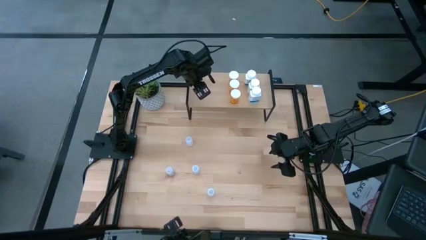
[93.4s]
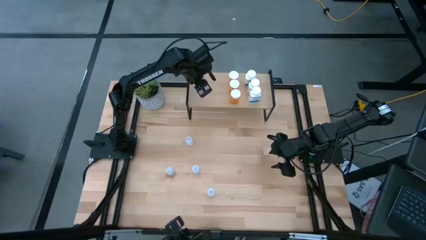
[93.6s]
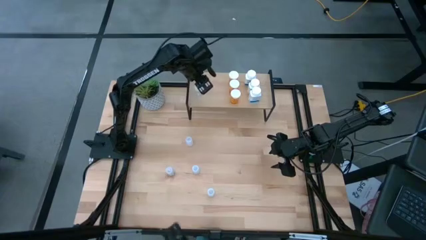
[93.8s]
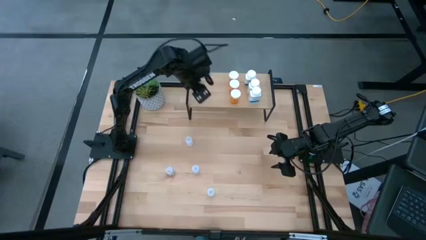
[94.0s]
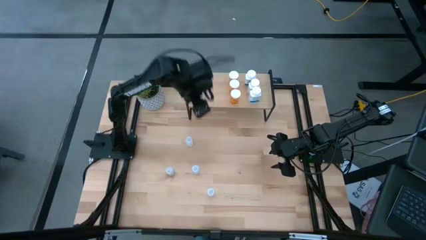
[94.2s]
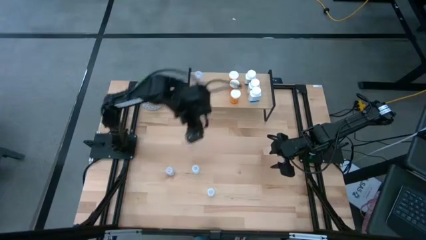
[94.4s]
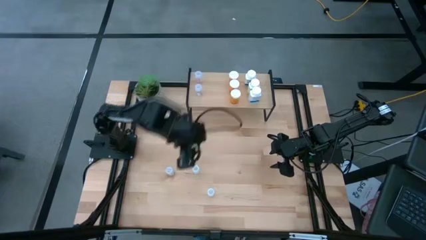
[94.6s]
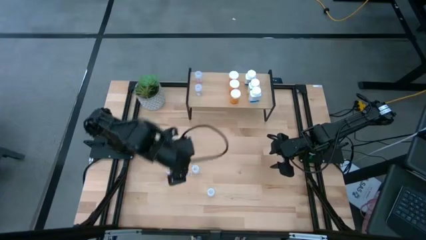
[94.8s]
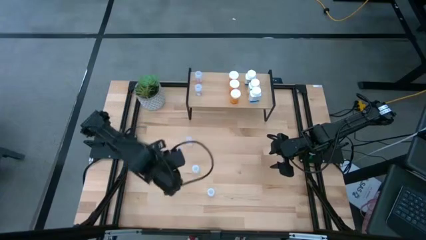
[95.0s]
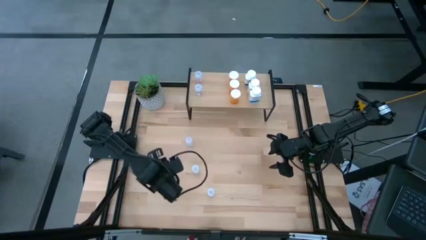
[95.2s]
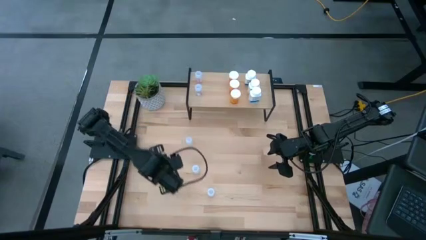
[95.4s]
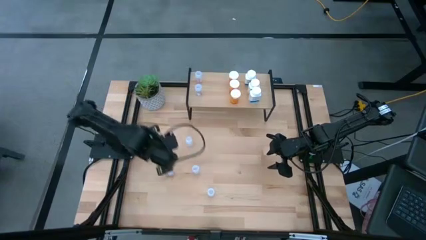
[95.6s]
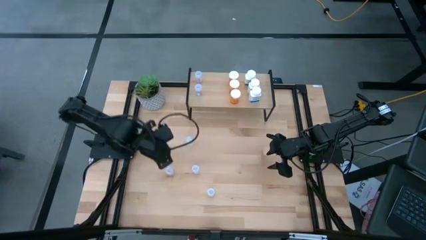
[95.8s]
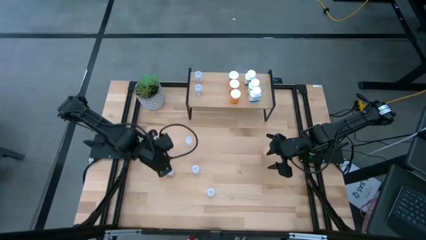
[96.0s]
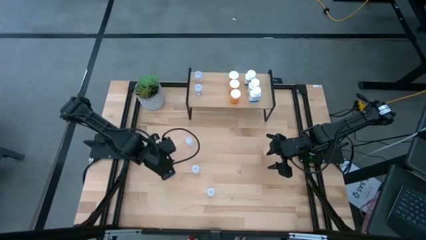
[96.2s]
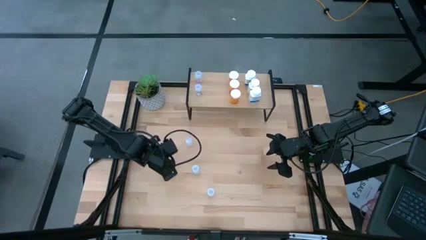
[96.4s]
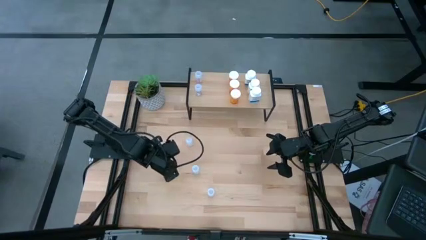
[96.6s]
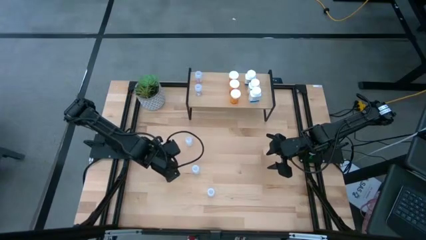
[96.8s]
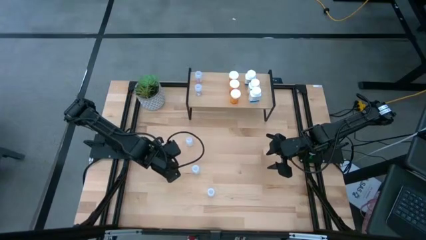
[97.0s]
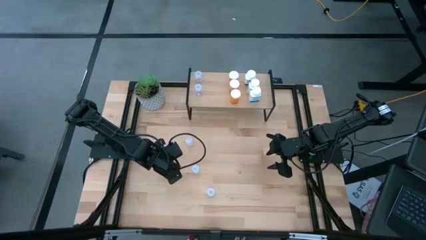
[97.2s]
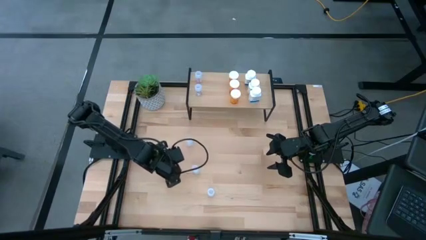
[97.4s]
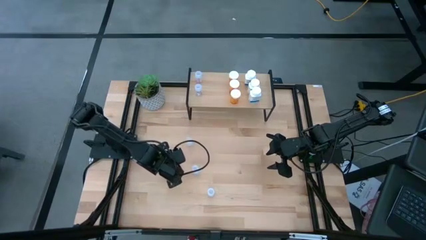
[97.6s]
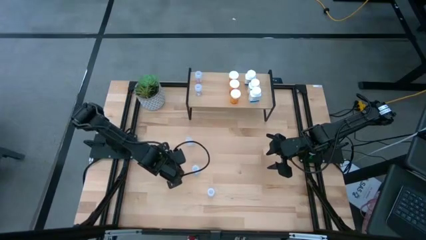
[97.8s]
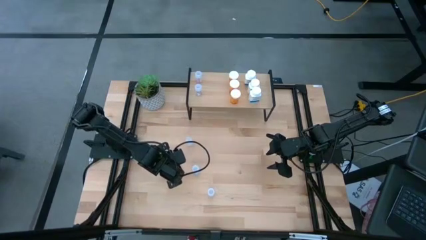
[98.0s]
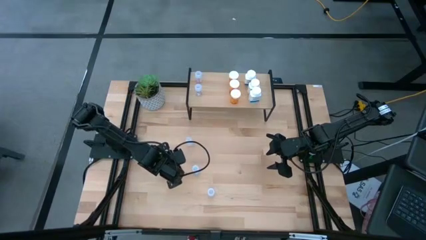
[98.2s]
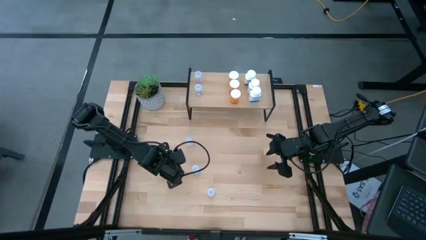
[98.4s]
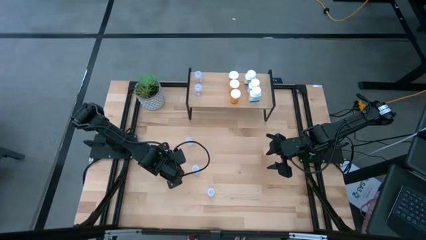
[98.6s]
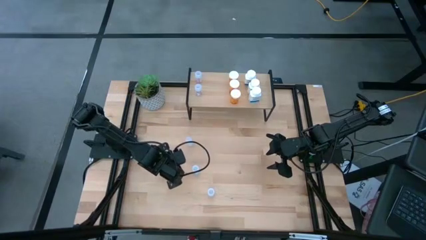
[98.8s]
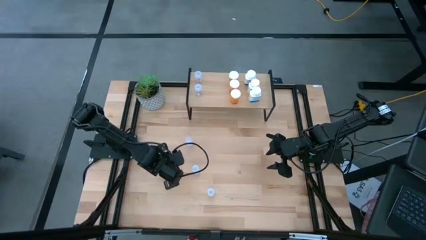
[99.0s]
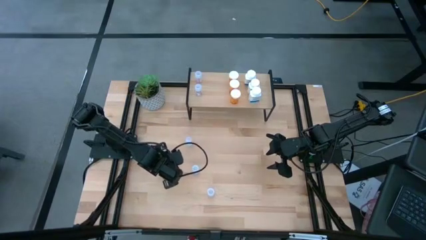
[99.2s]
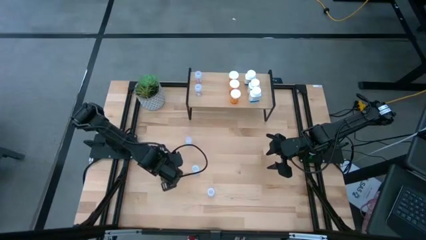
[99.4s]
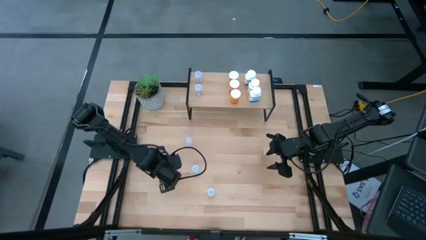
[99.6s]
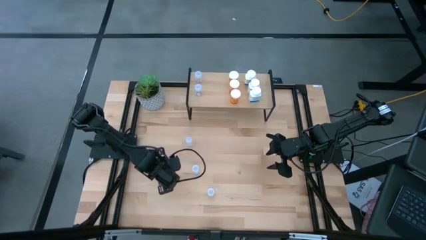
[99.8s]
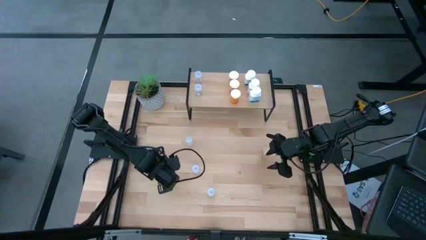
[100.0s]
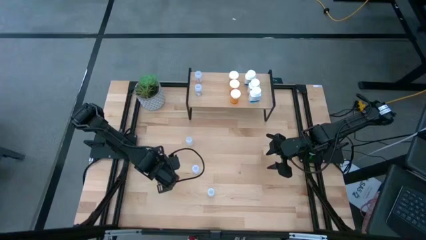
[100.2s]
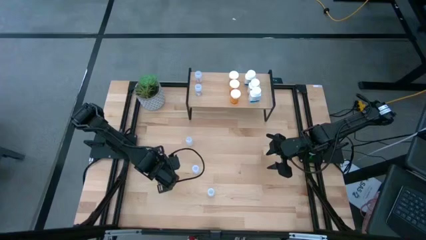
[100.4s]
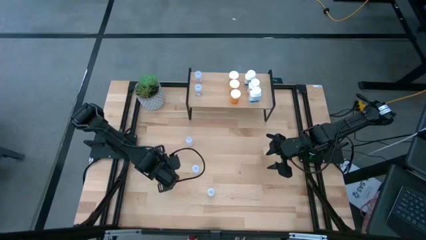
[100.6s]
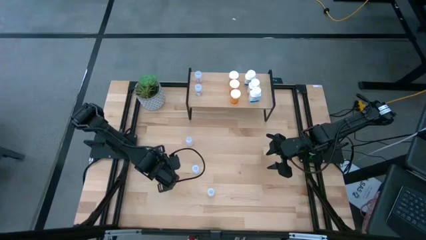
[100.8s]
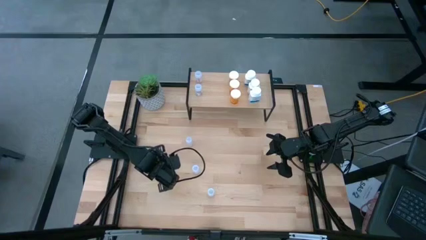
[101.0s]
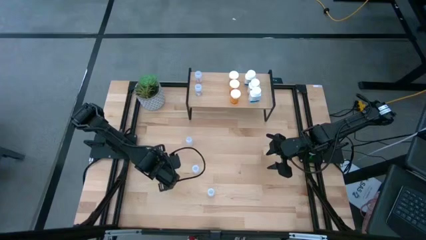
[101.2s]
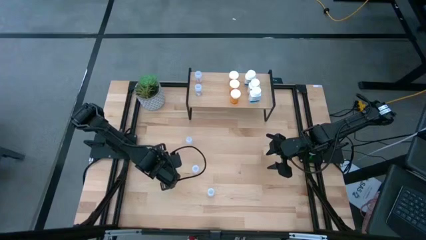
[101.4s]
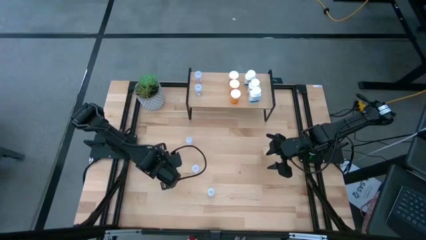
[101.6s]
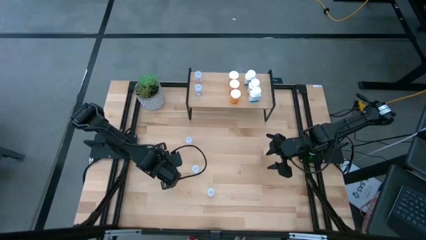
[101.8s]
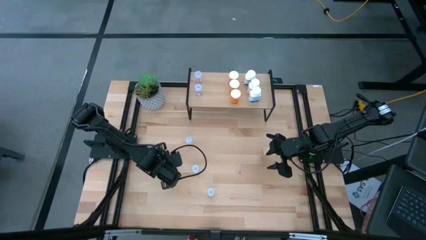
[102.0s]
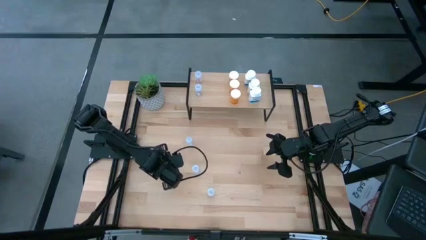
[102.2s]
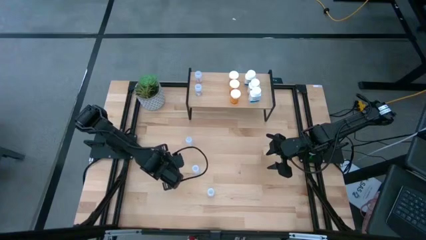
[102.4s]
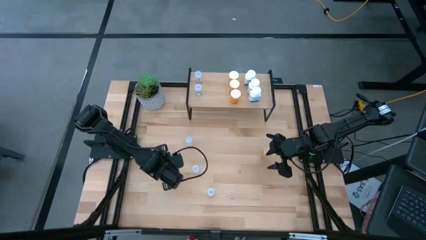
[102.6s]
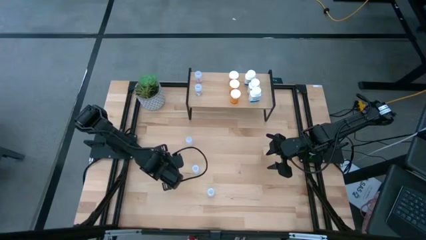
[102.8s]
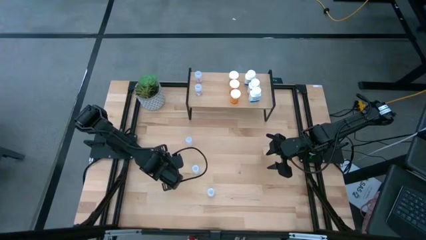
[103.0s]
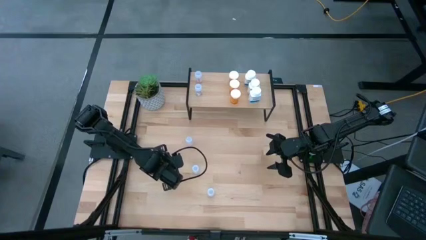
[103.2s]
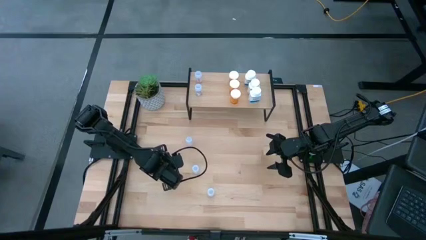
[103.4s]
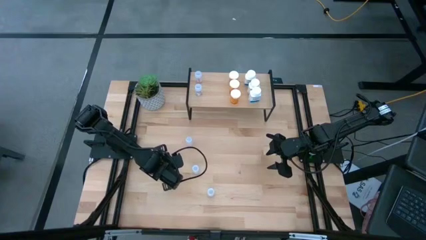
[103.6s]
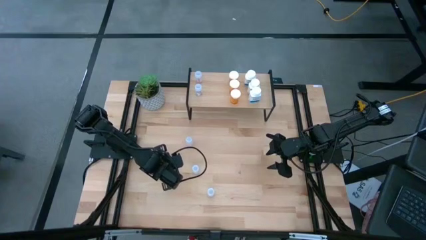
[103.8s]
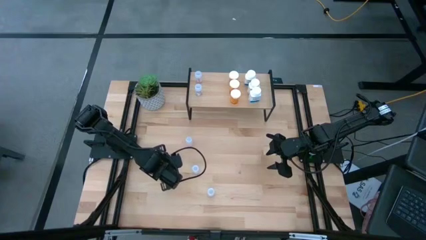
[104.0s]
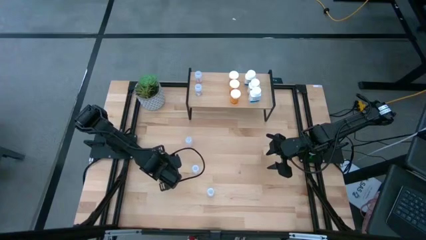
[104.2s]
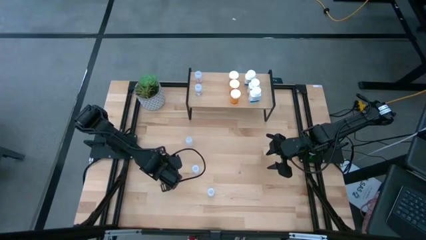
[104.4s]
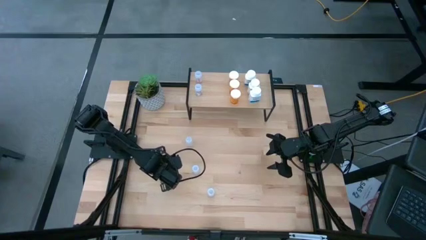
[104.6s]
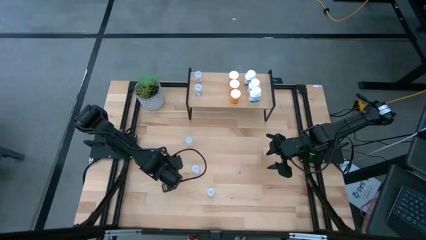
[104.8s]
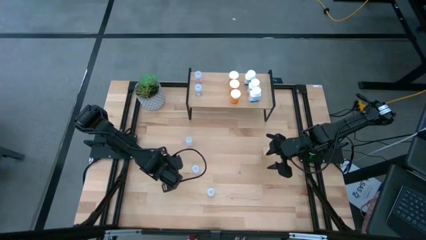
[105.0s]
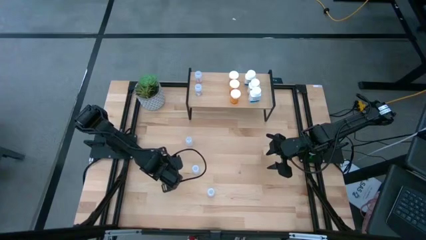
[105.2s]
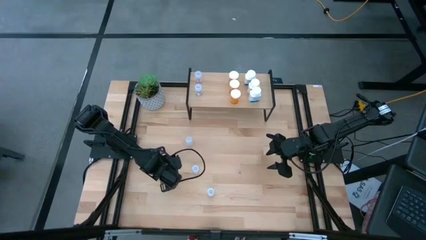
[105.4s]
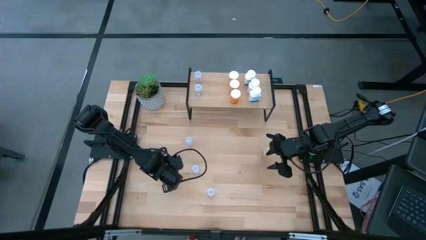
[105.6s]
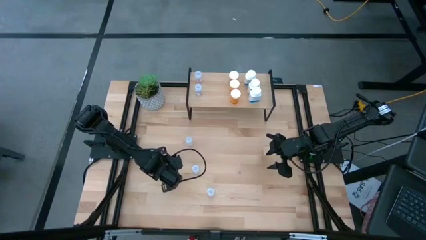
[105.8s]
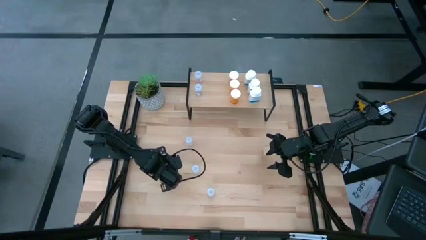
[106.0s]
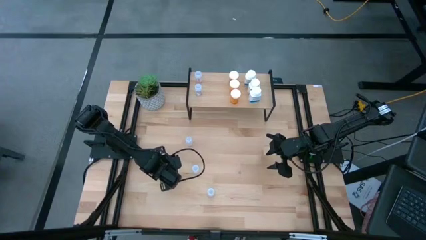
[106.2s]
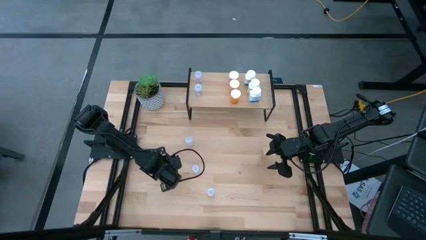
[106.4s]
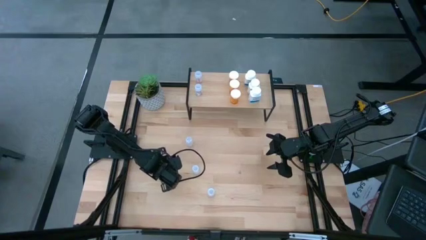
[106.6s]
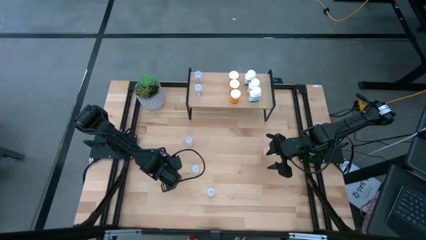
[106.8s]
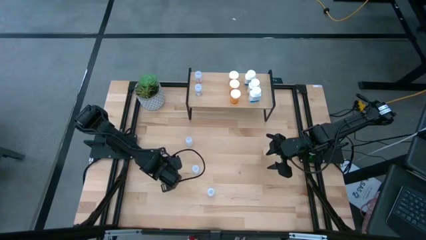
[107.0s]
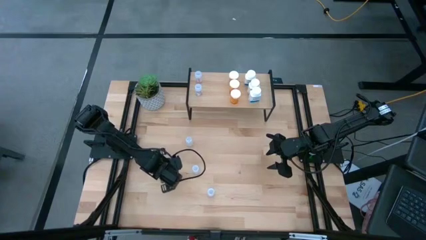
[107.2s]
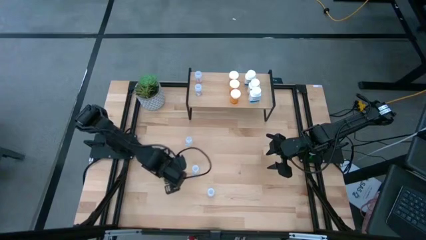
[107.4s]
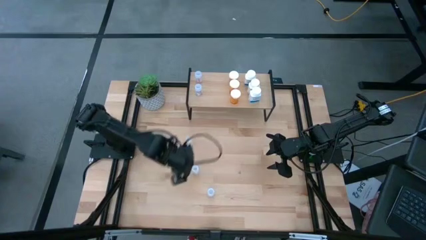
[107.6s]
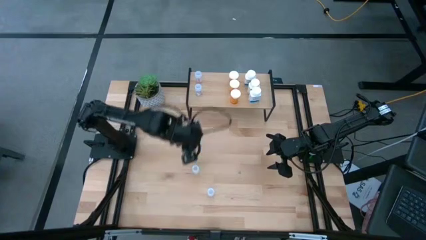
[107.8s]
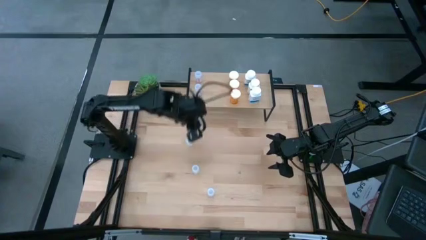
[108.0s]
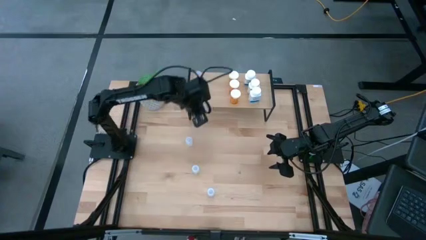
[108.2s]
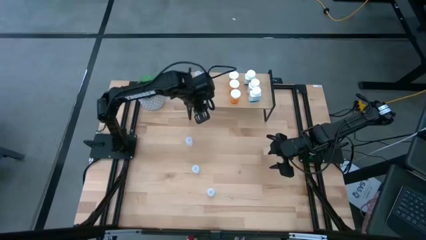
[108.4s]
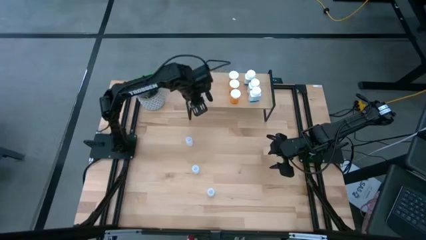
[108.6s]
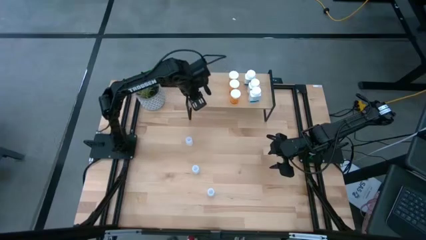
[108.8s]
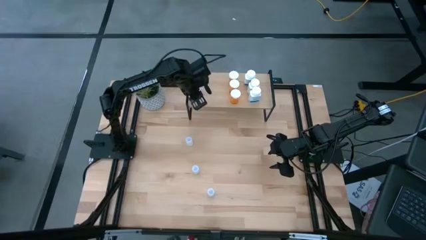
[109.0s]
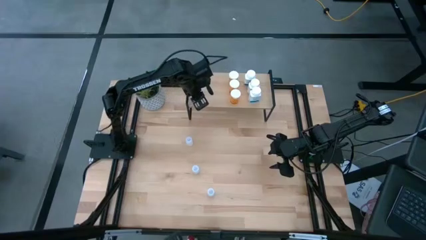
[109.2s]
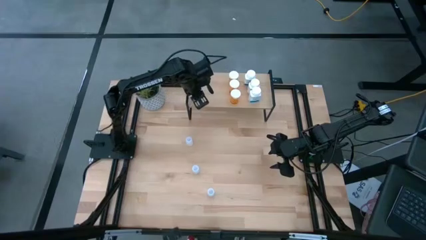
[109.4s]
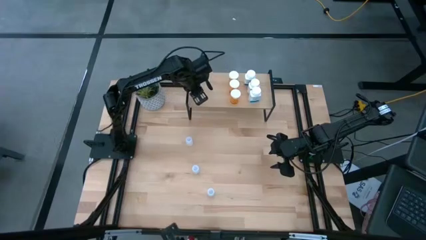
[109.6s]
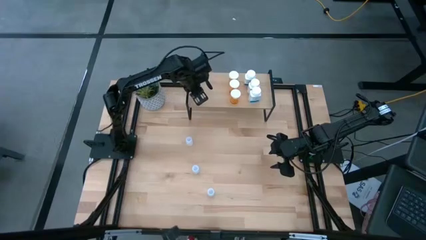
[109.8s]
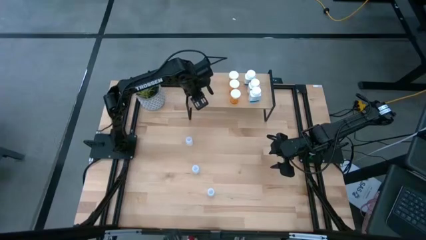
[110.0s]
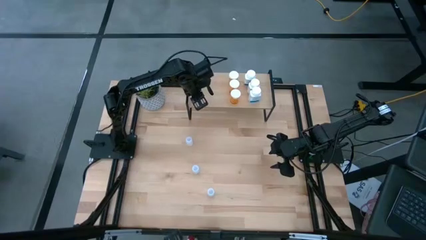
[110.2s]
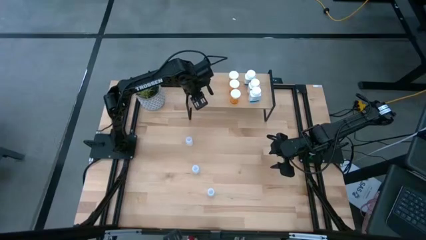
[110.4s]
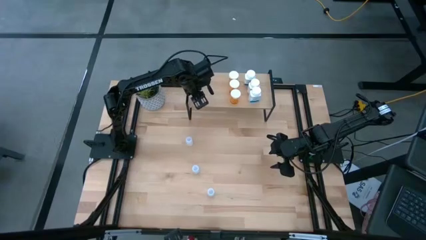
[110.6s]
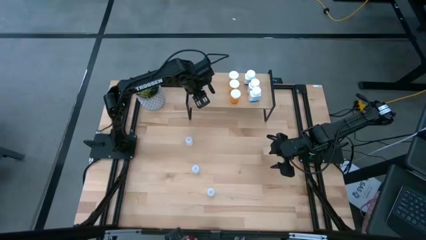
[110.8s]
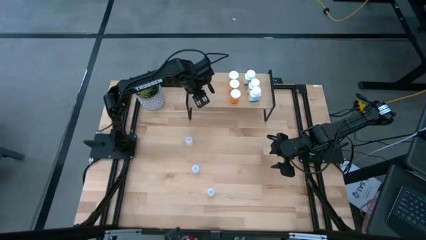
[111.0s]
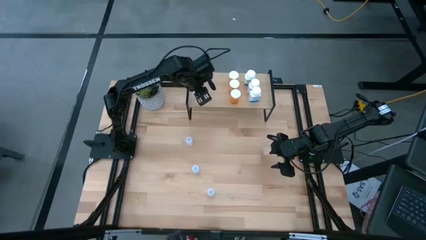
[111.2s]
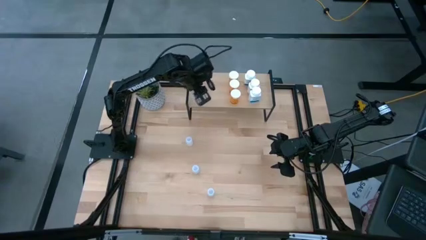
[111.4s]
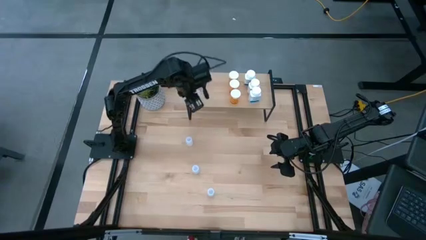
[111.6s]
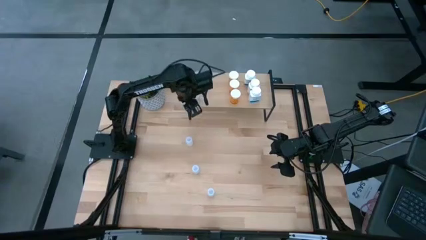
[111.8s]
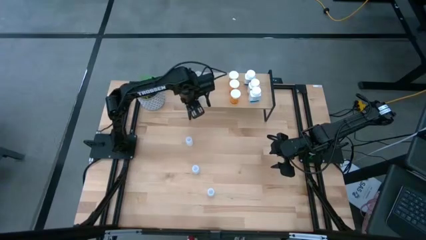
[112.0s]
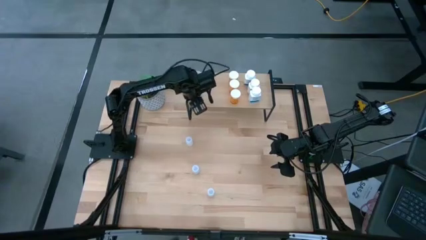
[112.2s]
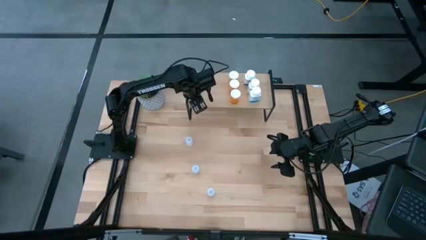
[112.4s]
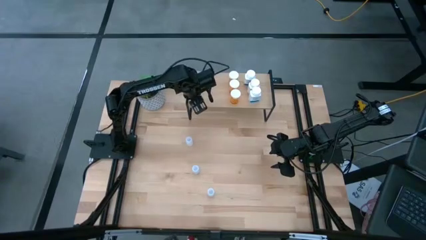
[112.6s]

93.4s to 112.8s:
Task: Pick and place medicine bottles onto shelf by color
Put the transparent pill bottle on the shelf aligned with the other transparent pill bottles
